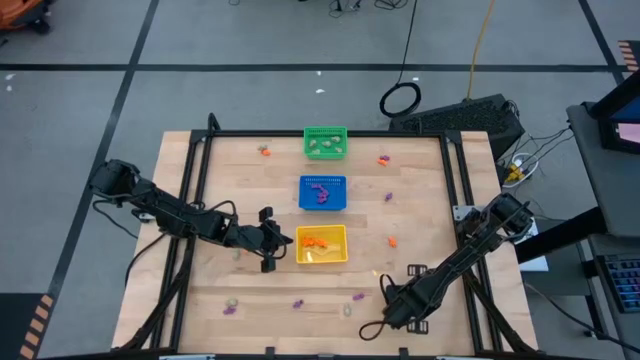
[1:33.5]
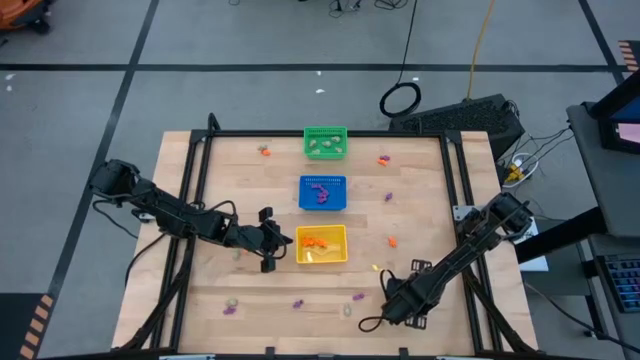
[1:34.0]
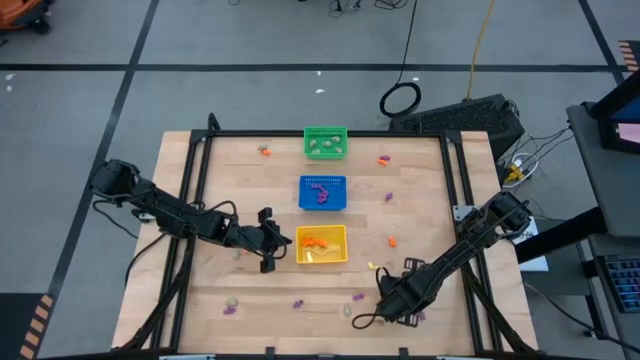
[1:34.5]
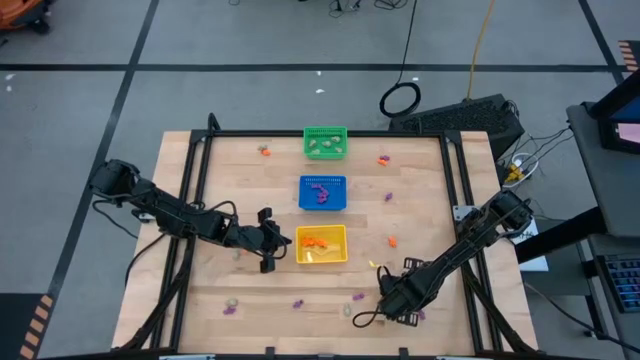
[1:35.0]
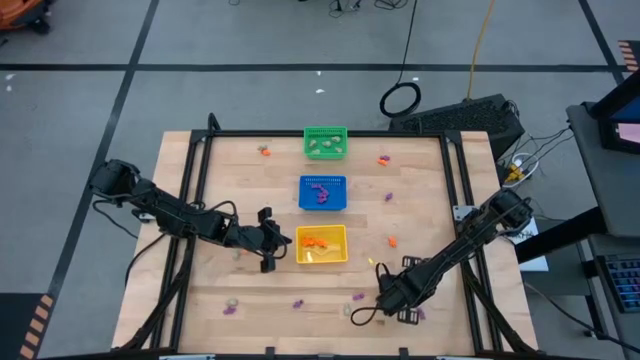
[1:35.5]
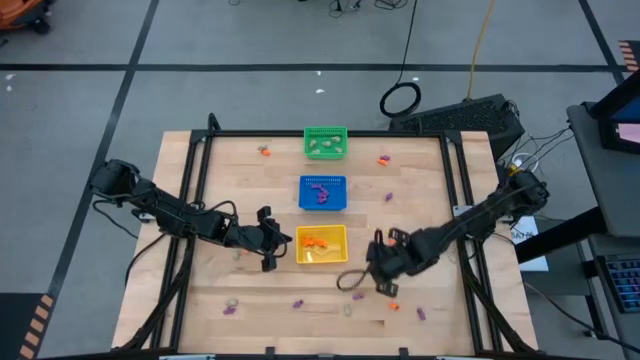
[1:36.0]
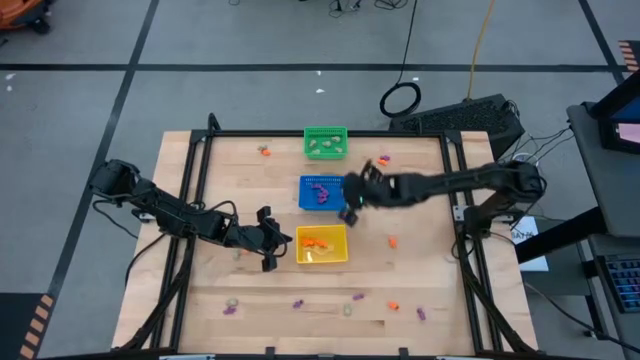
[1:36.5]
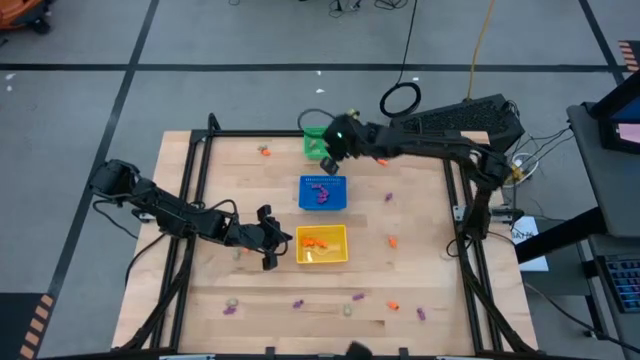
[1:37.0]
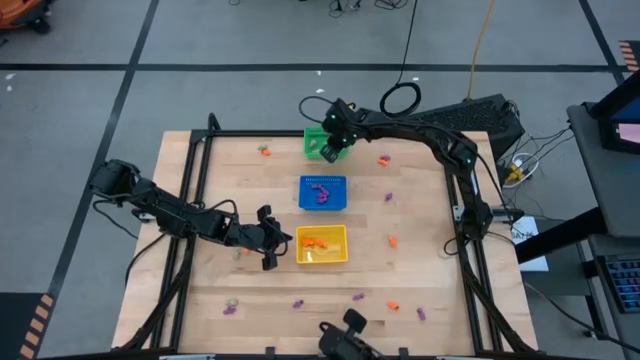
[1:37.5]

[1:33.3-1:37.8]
Task: Sort Halloween decoration
Put the white skull toy into the green bin

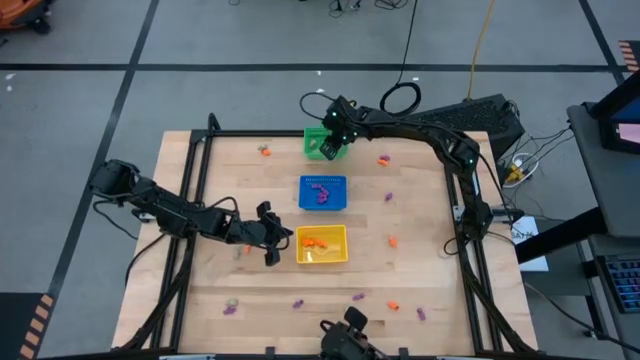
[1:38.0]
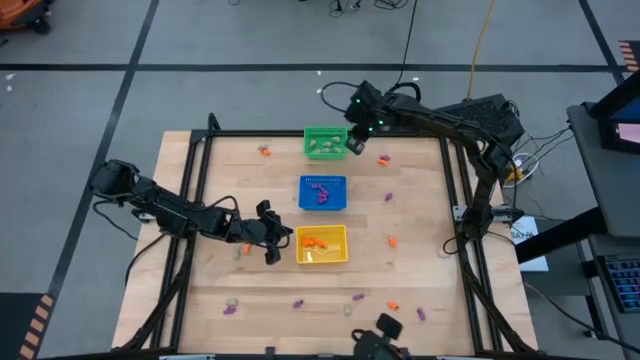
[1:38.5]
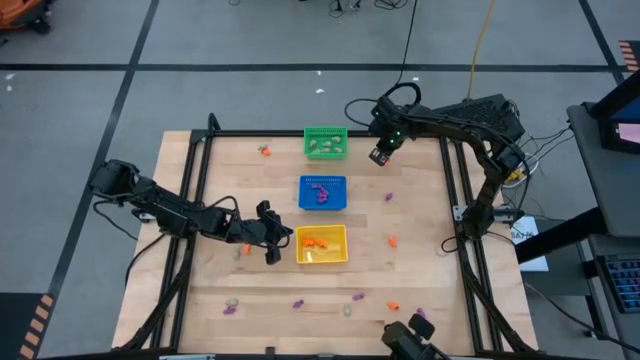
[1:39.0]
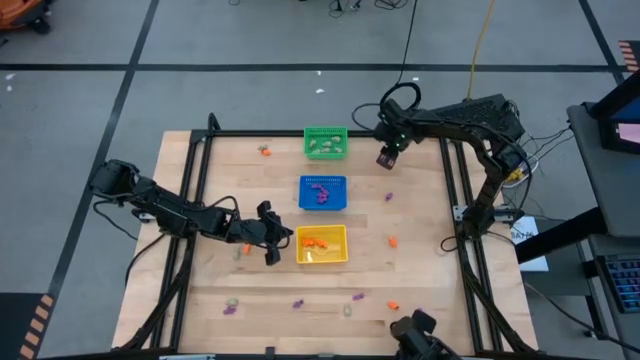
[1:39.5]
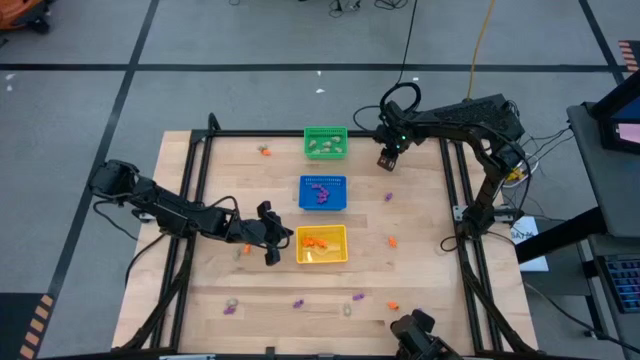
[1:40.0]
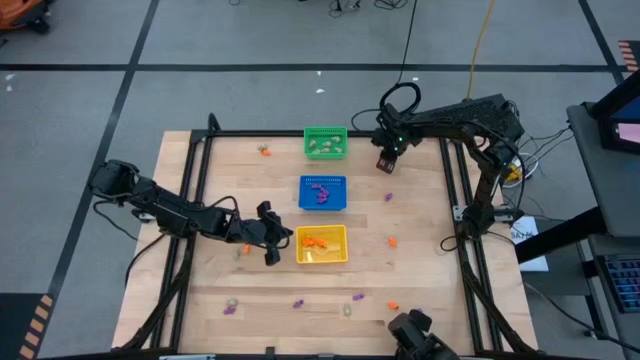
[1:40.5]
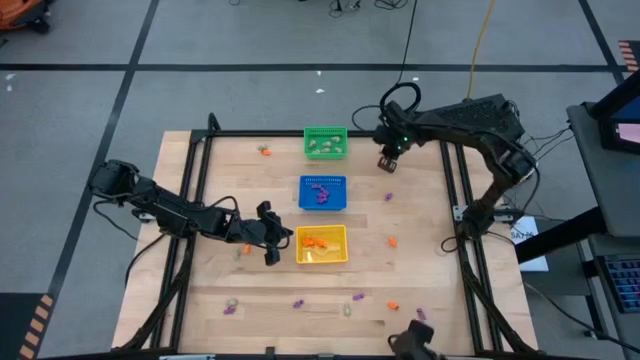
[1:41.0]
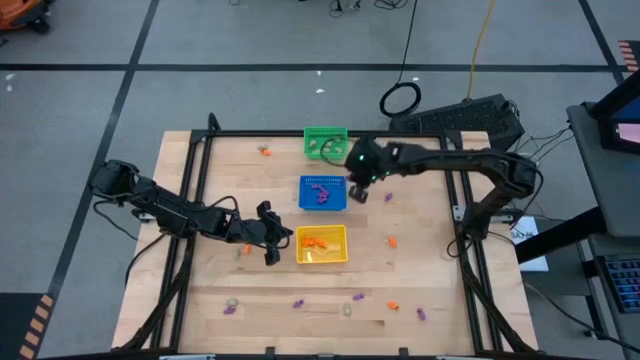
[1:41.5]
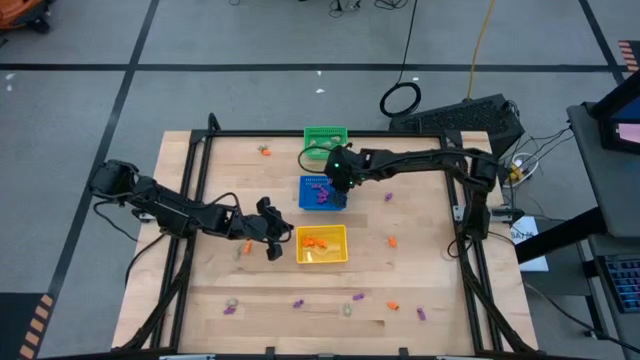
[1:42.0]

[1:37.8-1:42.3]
Put the purple skeleton toy into the blue bin

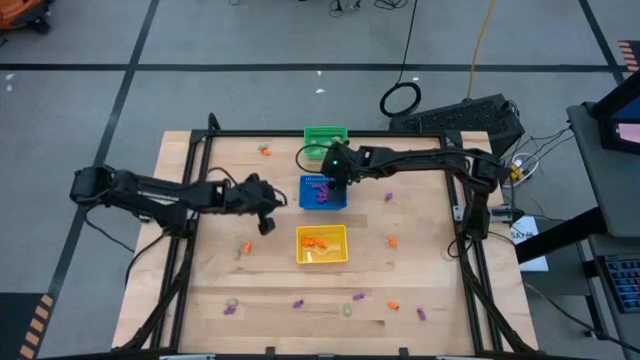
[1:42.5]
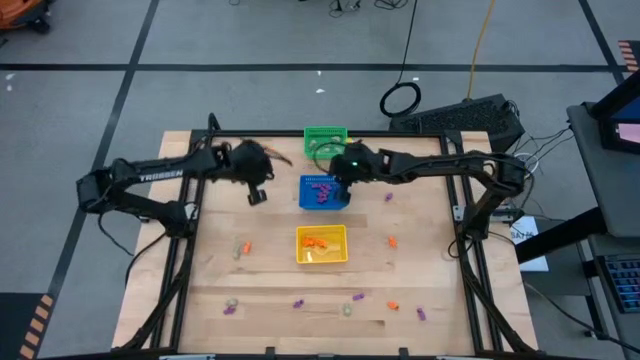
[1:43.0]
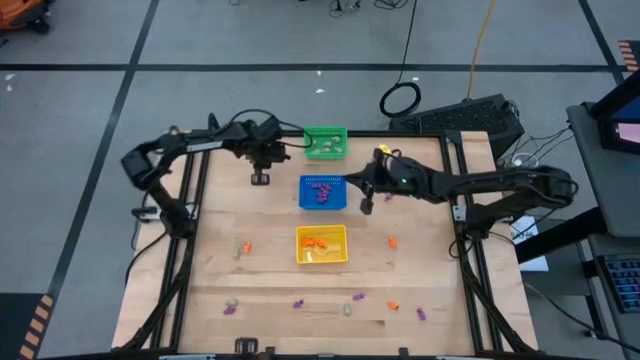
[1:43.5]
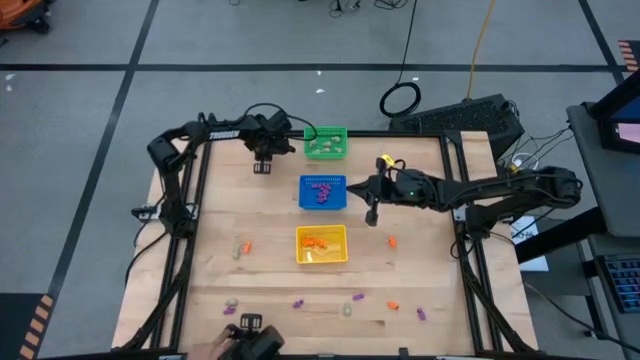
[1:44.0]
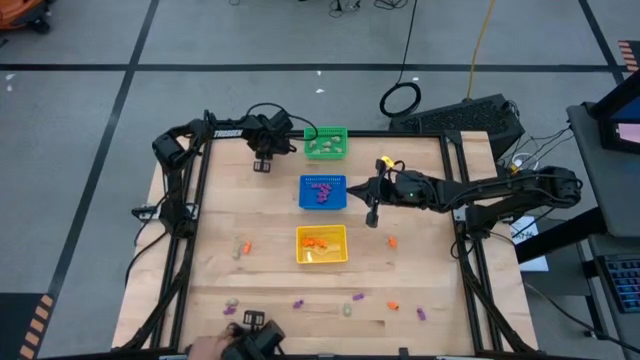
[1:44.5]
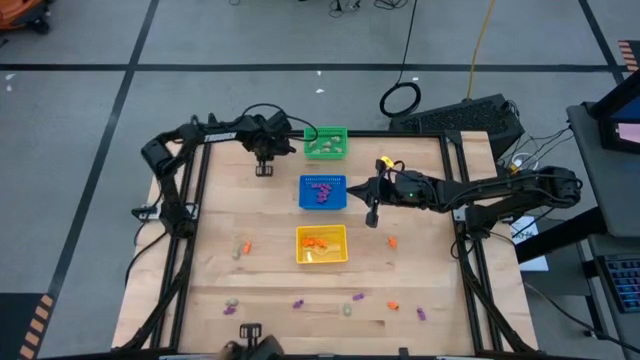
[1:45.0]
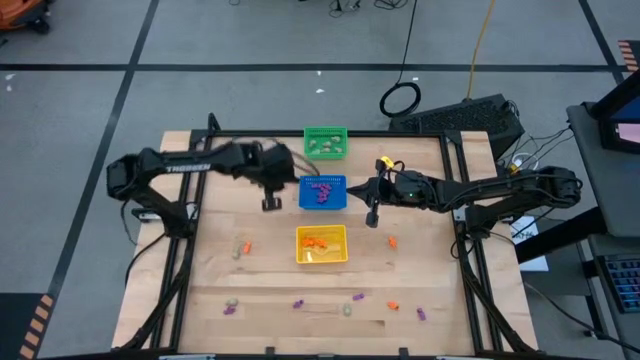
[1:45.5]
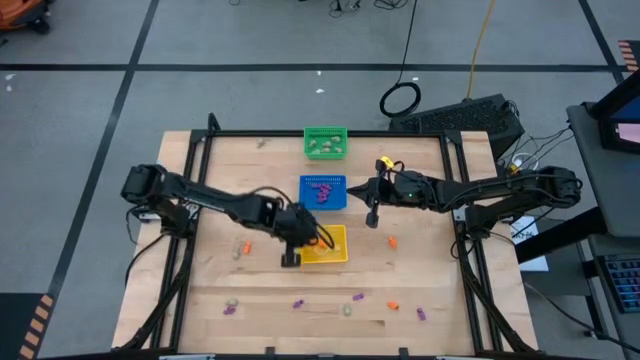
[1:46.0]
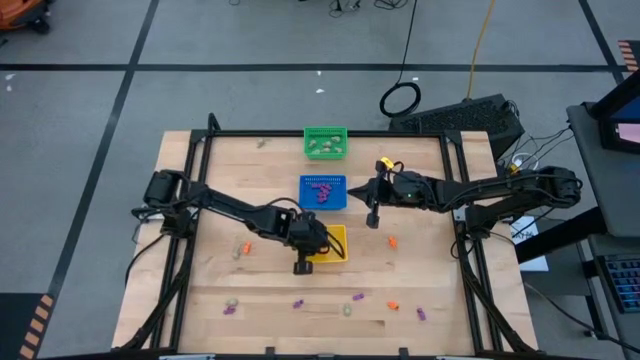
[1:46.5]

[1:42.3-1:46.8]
Put the orange skeleton toy into the yellow bin

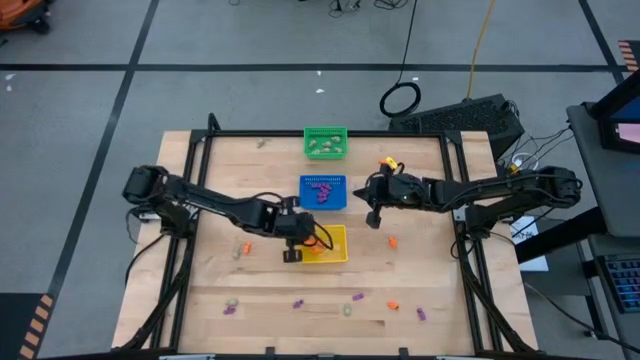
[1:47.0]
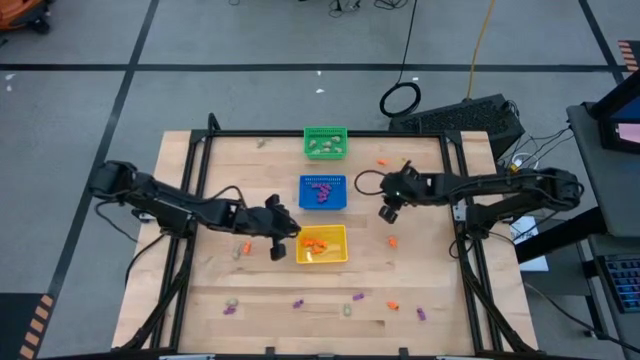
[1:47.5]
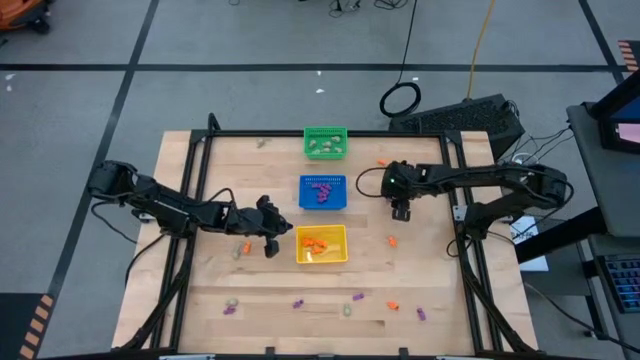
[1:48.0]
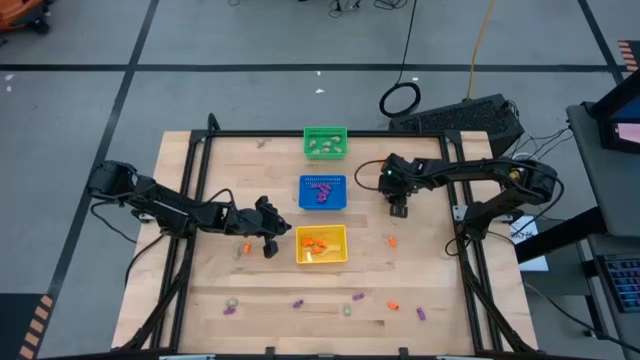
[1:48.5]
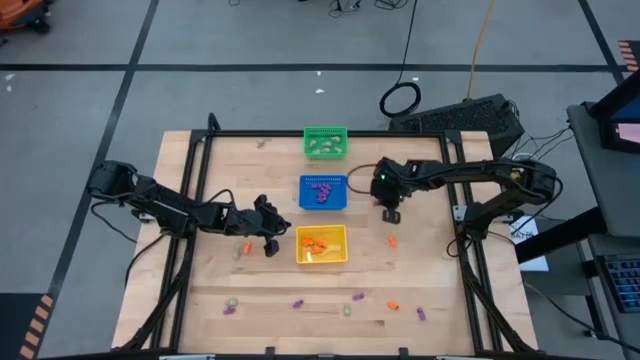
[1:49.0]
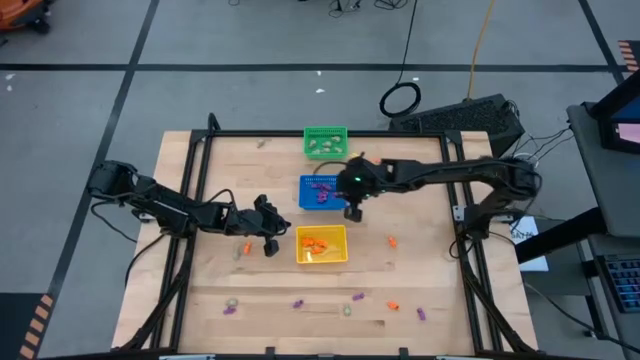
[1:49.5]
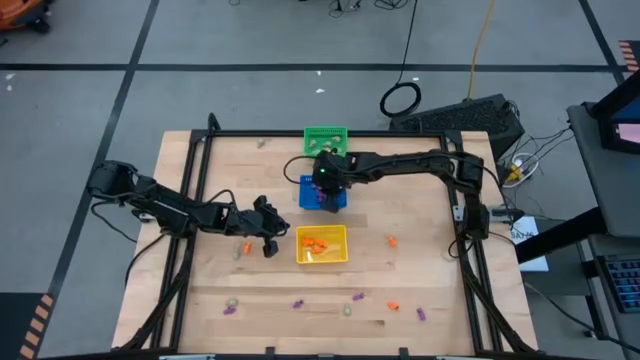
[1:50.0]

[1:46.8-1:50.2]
Put the purple skeleton toy into the blue bin

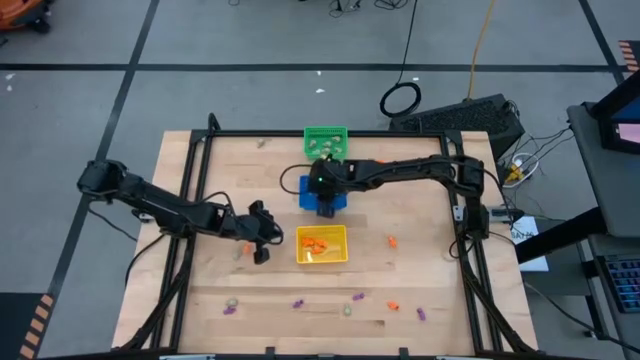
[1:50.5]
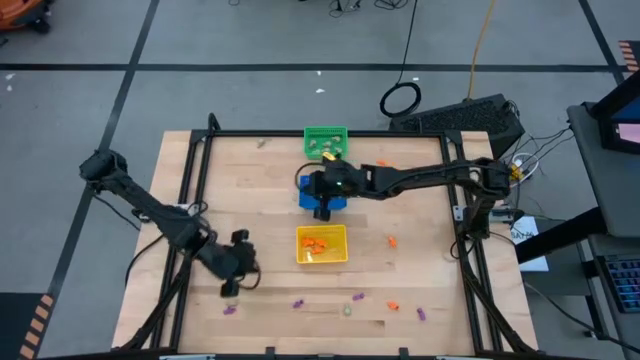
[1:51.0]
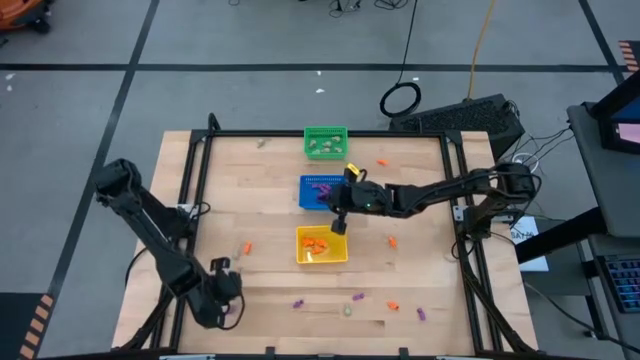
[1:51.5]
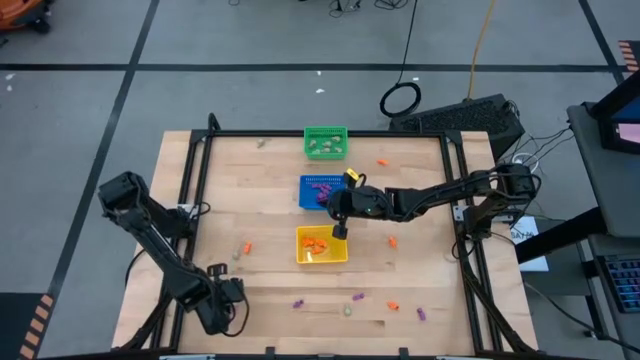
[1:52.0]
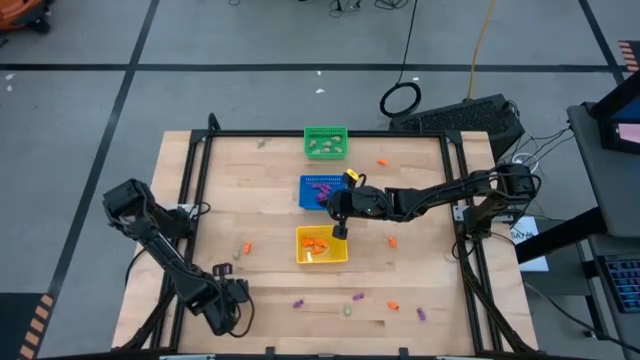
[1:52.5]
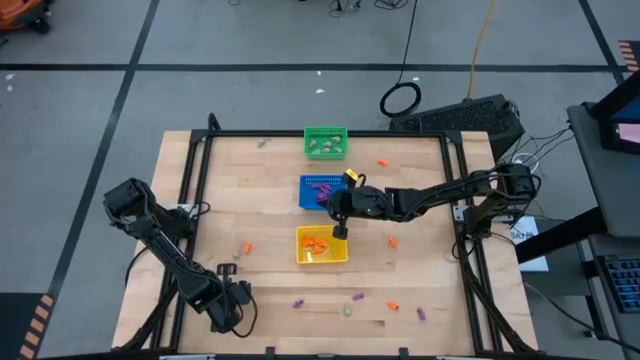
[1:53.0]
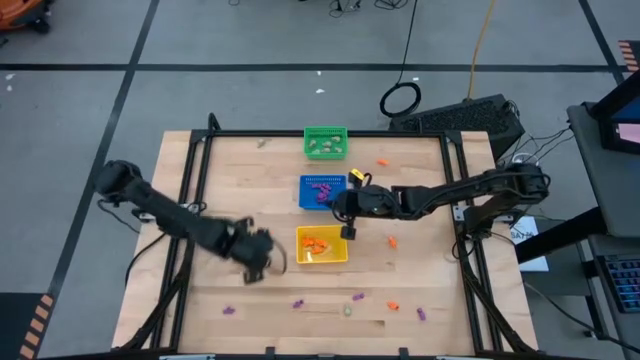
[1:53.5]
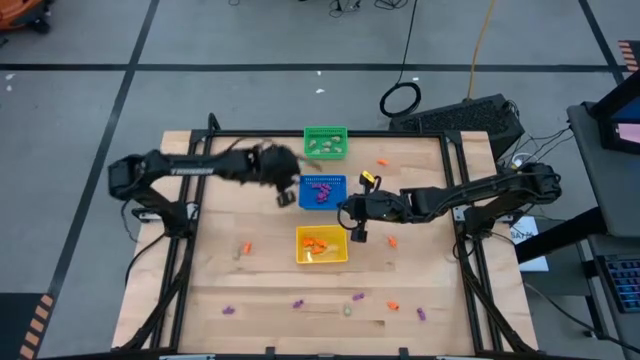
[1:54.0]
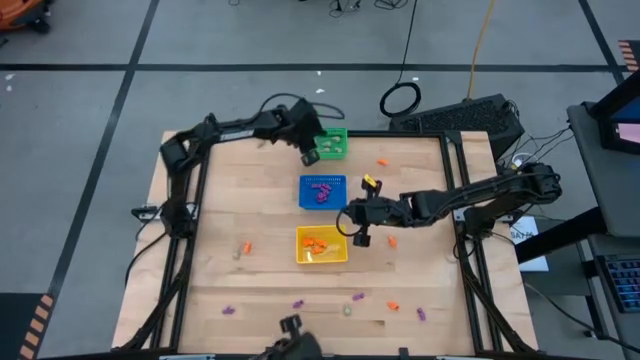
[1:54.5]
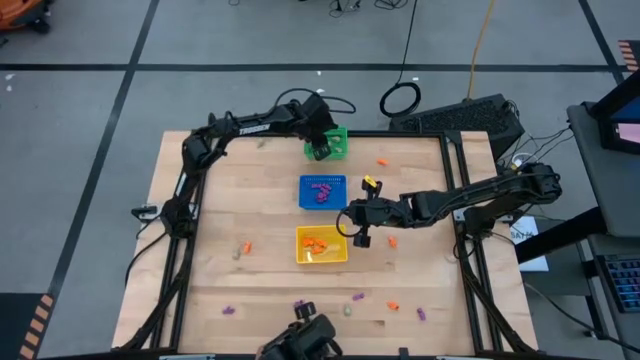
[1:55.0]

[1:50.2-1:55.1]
Put the white skull toy into the green bin
